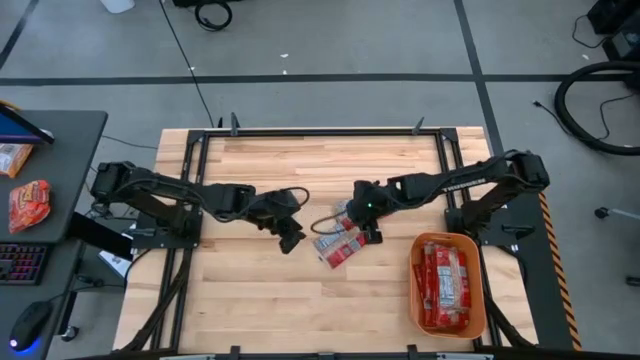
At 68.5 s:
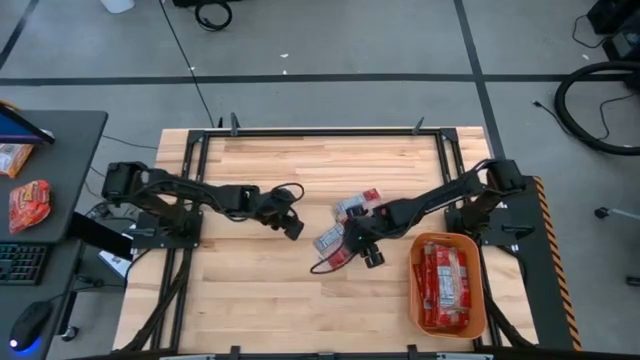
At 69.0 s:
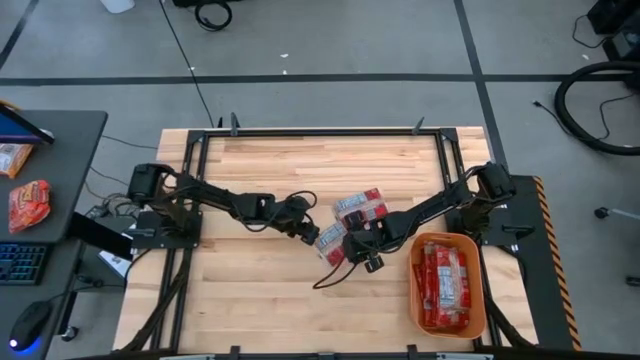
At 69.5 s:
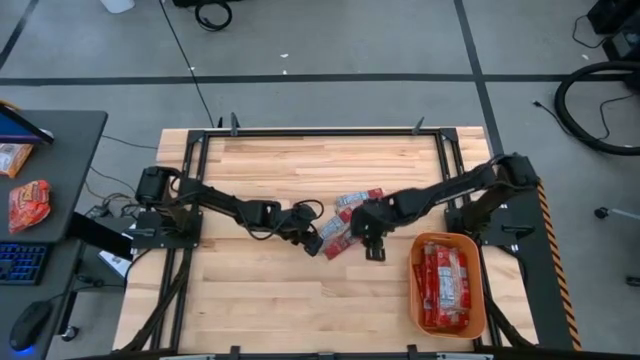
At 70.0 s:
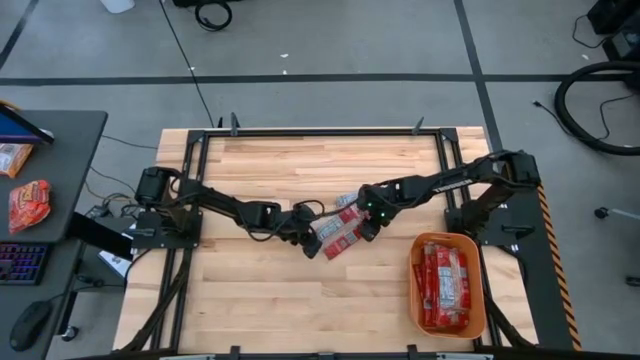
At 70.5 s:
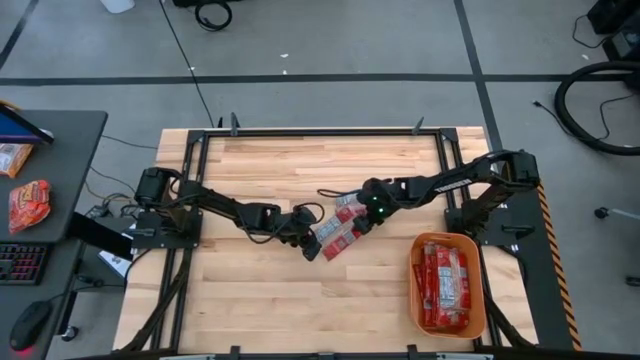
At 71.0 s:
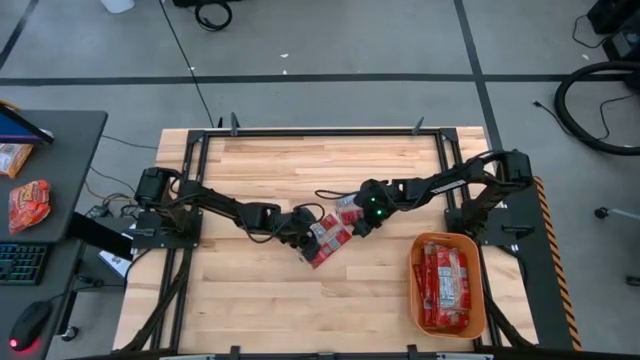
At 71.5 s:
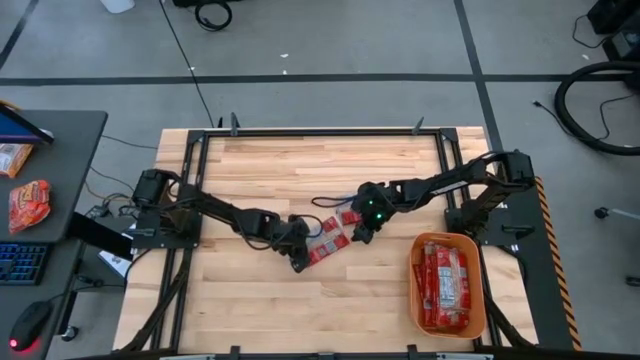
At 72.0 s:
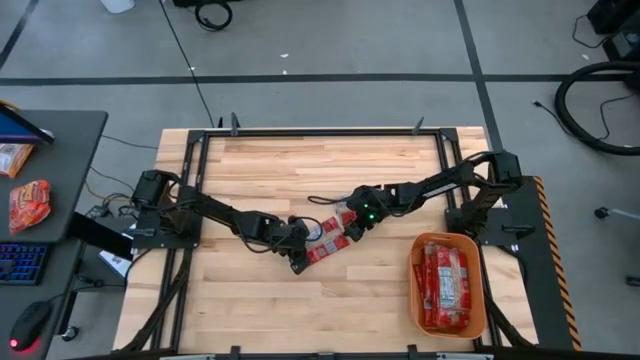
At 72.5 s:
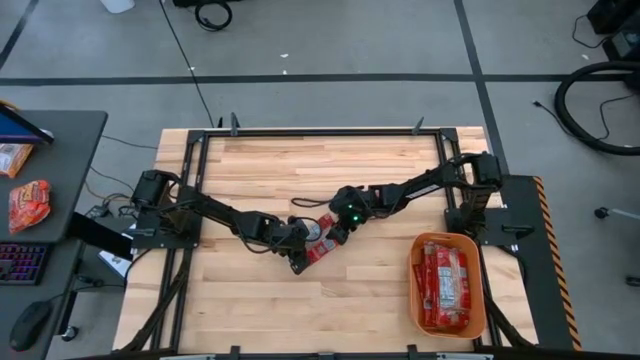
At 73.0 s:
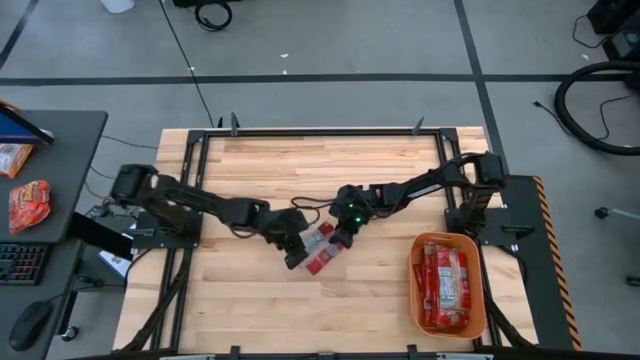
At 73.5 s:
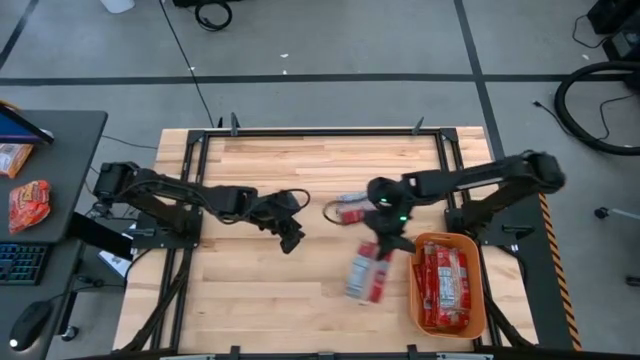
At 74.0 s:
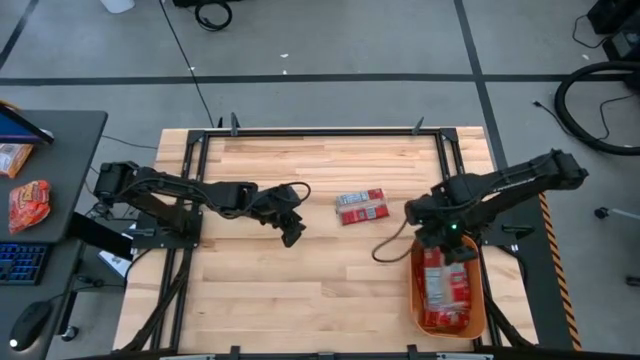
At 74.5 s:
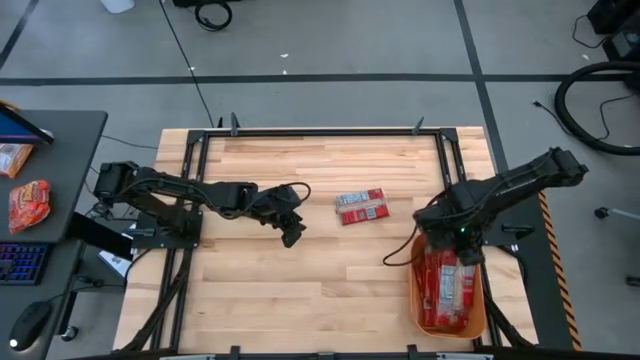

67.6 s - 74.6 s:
Task: Sort popcorn bags into baskets
Put the bottom red popcorn bag into the orange bin

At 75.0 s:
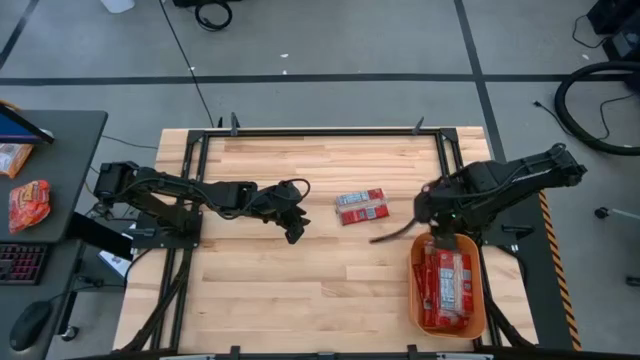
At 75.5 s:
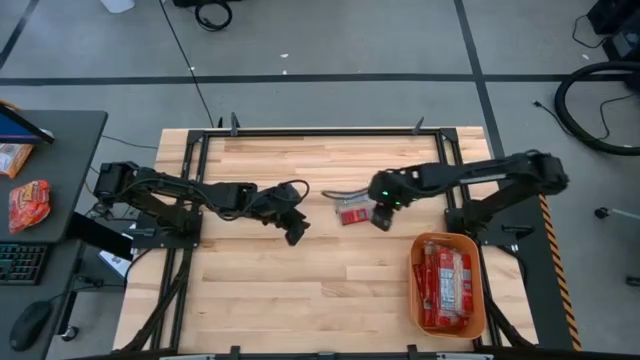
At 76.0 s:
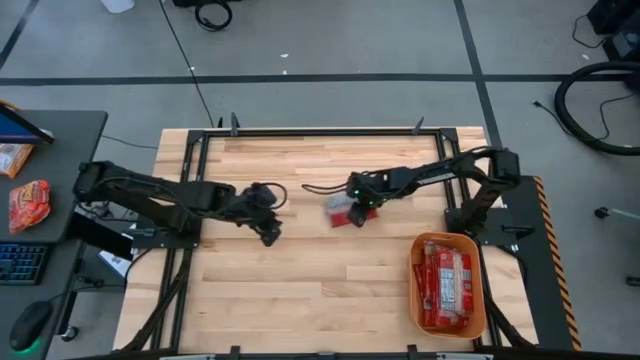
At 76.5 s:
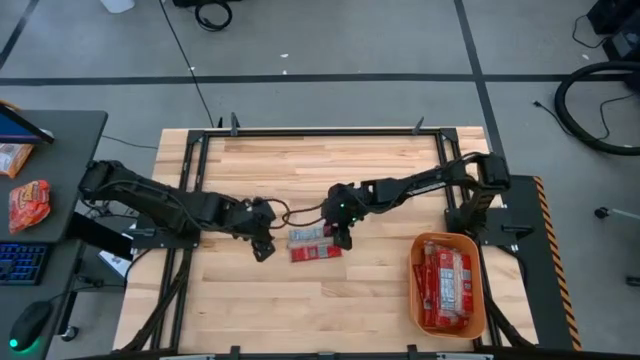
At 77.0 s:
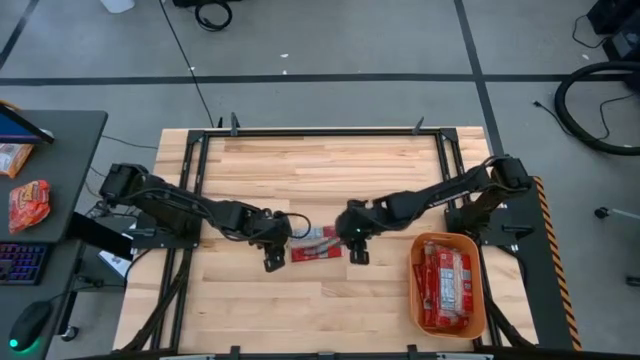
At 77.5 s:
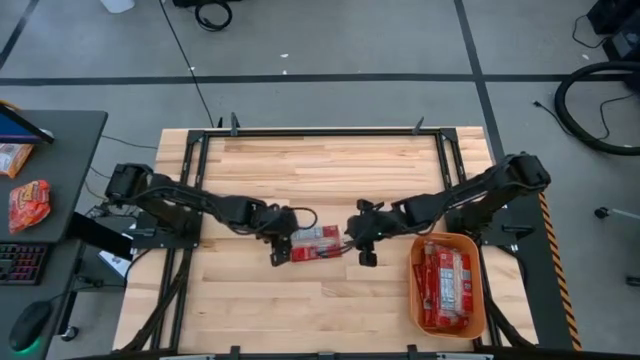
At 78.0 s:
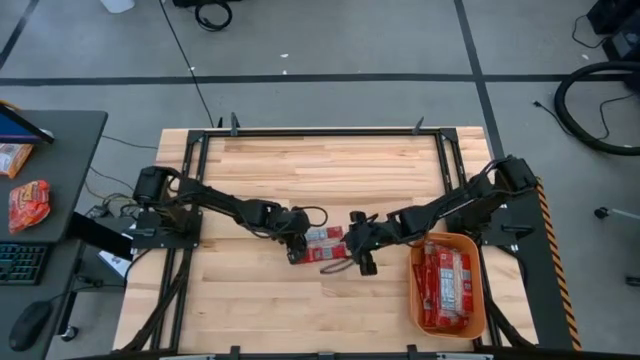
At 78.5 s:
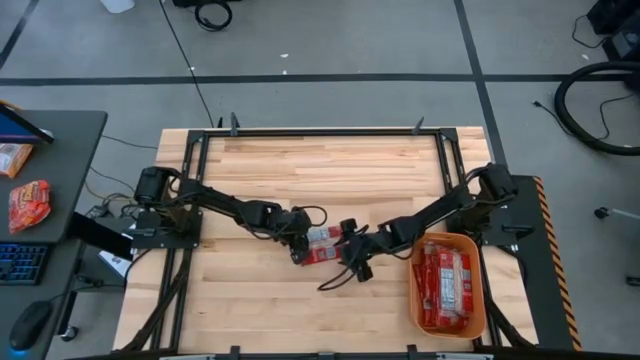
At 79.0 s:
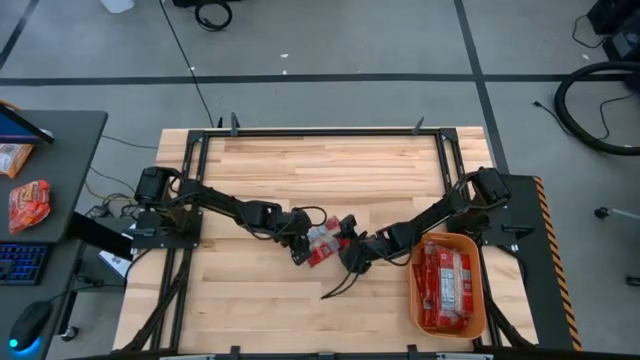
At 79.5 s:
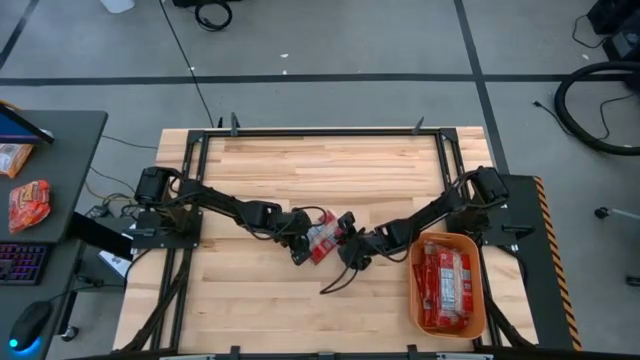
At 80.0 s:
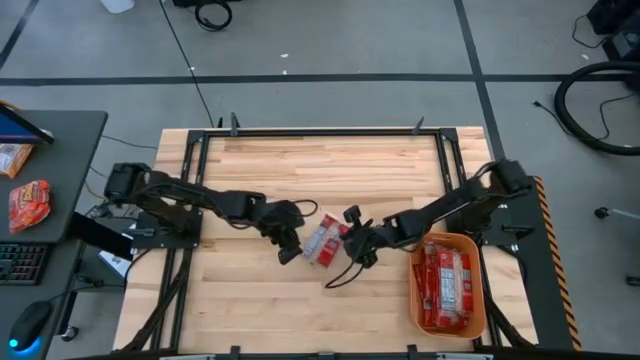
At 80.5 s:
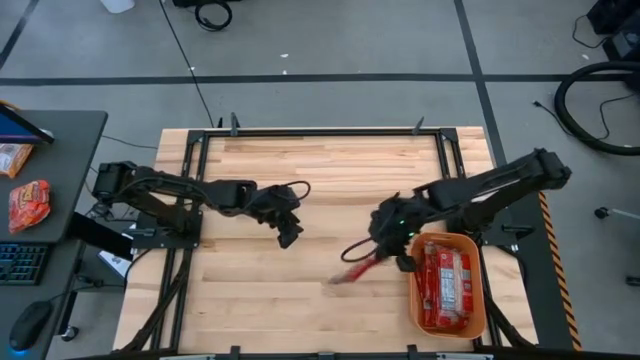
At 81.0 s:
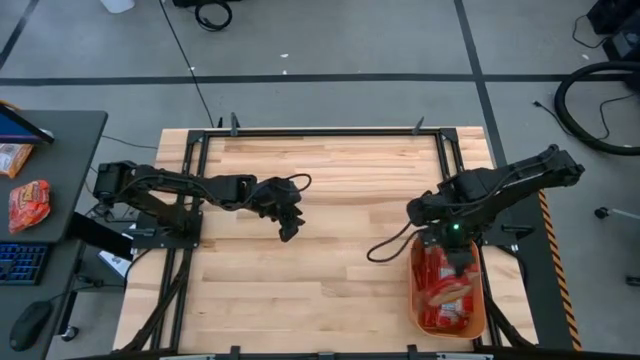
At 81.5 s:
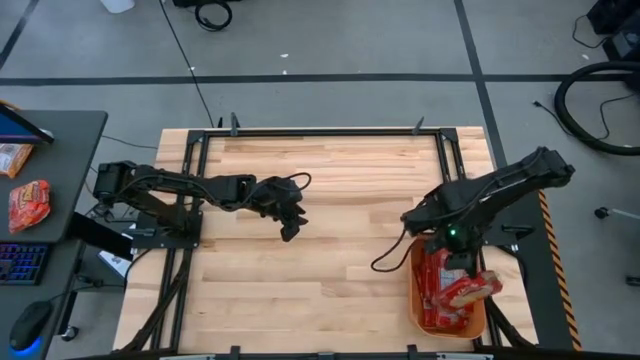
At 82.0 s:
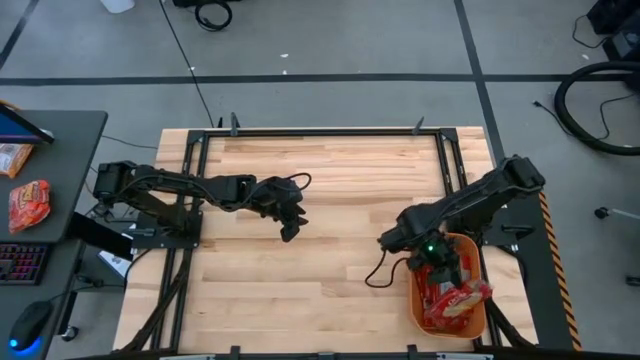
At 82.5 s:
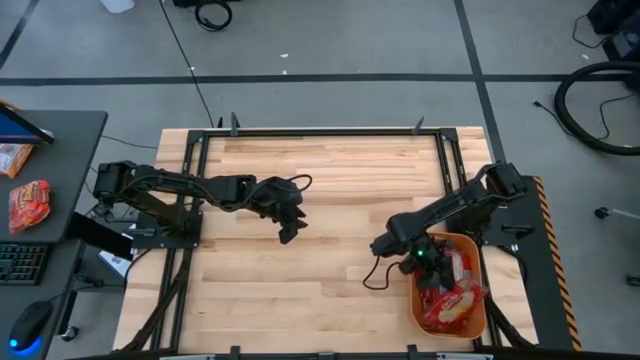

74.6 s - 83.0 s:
Put the red popcorn bag into the orange bin

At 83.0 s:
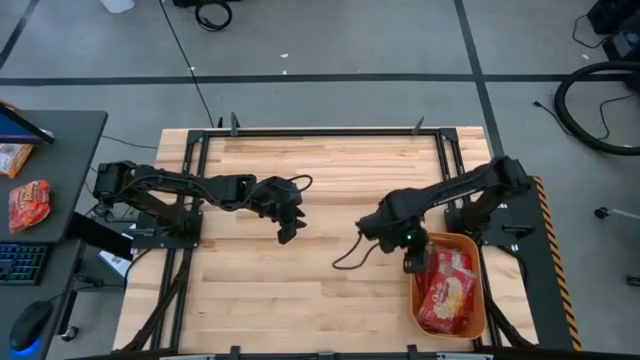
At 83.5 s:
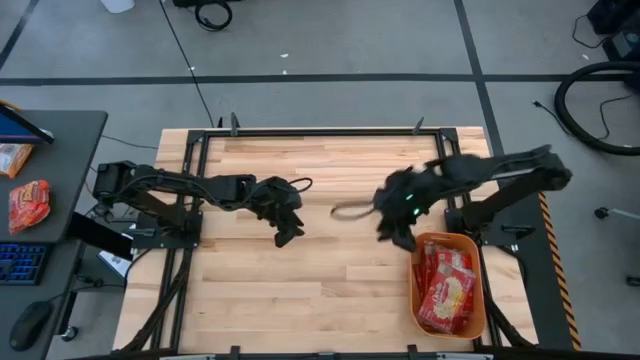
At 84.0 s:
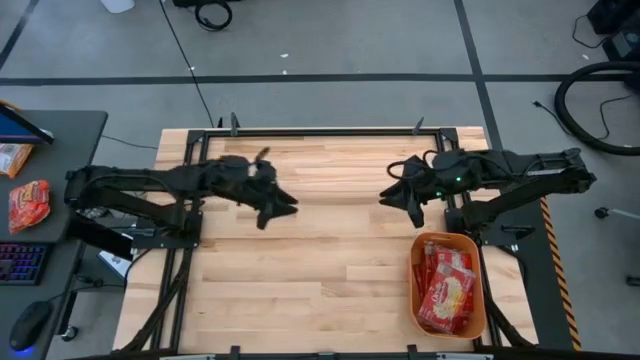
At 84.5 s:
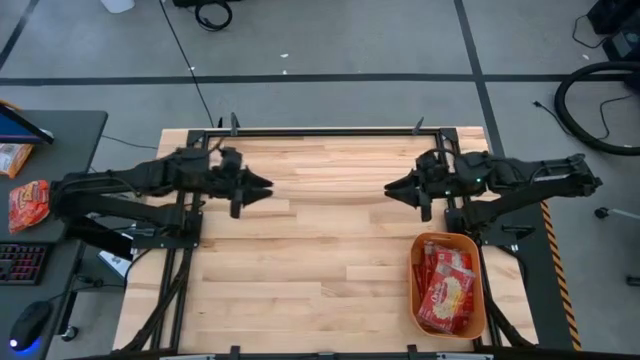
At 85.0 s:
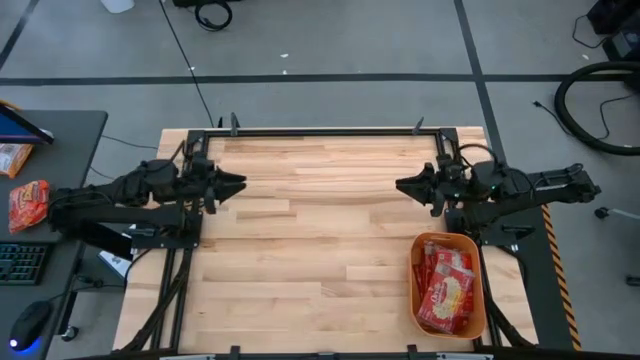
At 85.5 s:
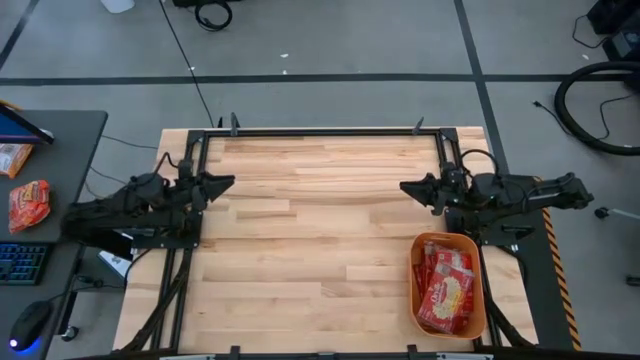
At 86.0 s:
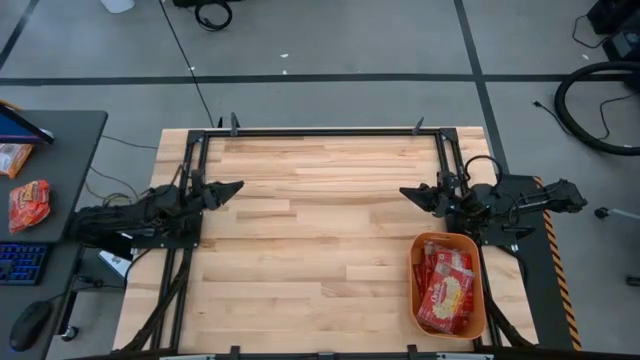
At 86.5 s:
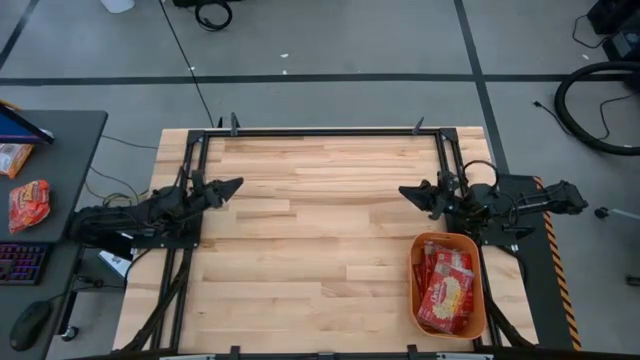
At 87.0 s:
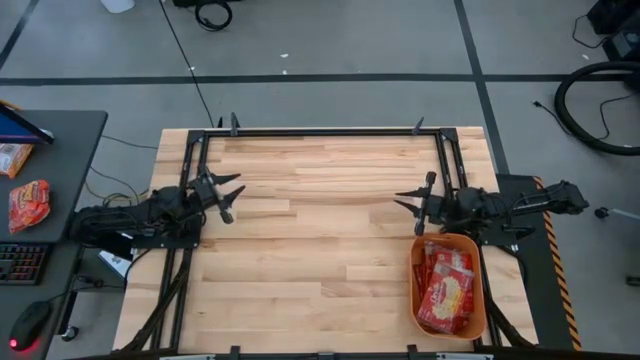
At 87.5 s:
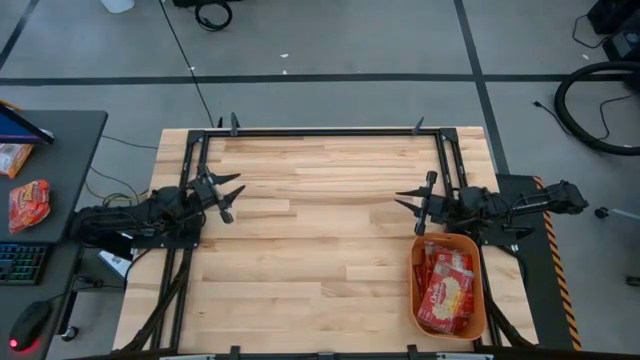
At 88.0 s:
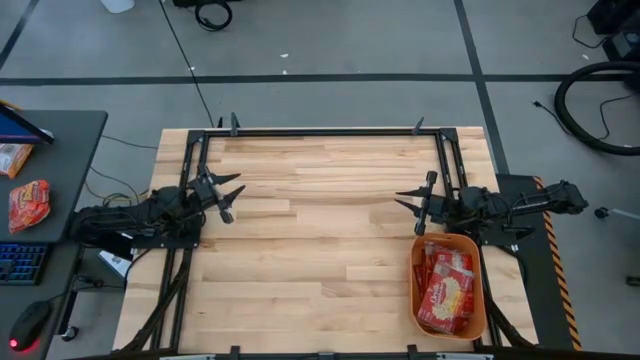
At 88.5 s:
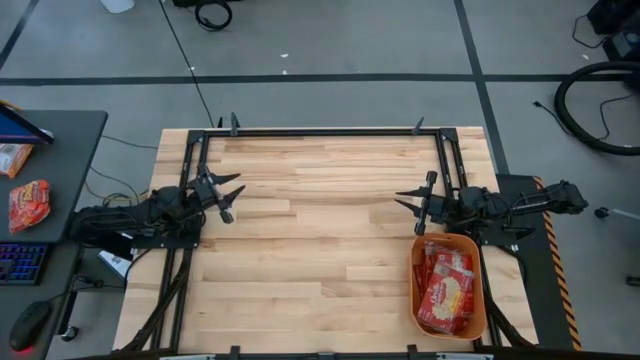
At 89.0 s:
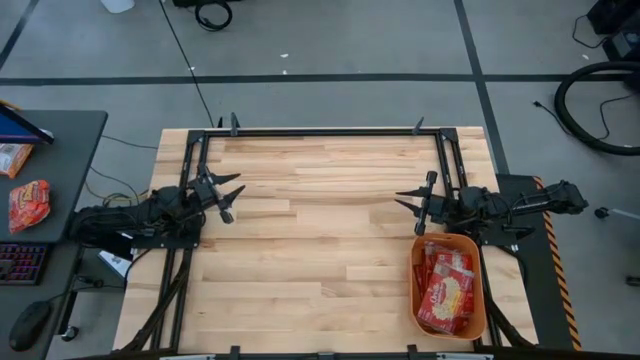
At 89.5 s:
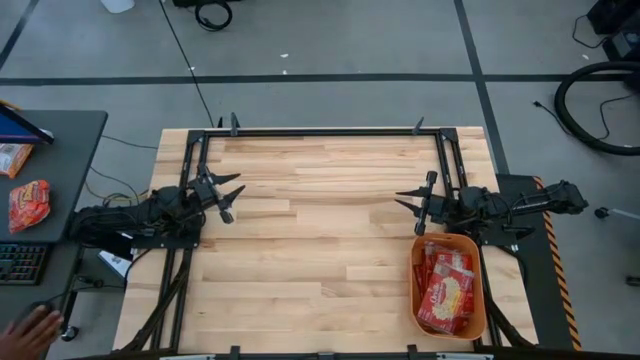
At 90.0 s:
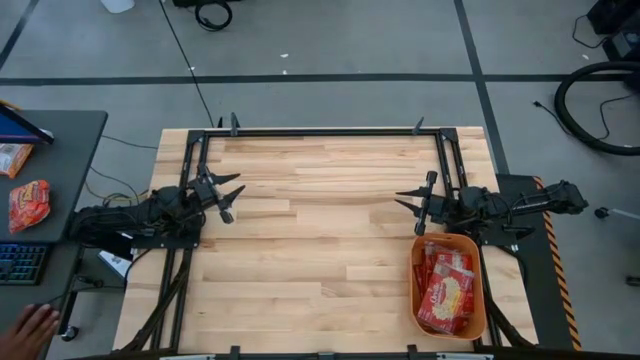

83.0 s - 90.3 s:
Return to Home Position
